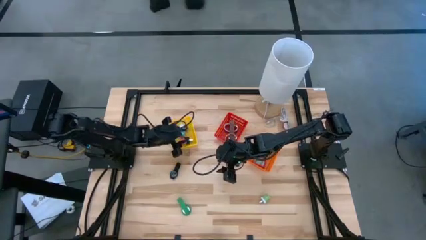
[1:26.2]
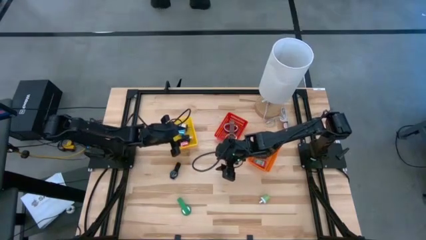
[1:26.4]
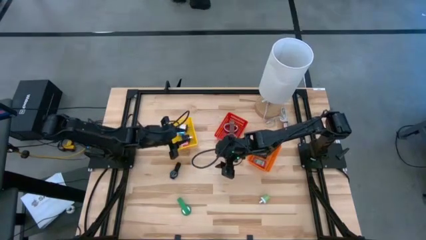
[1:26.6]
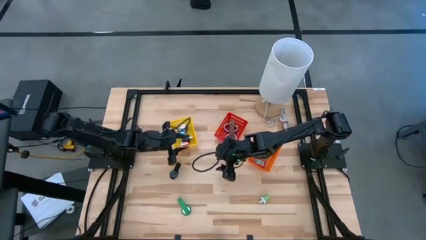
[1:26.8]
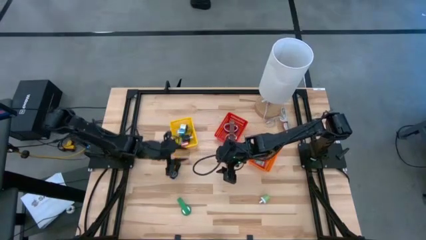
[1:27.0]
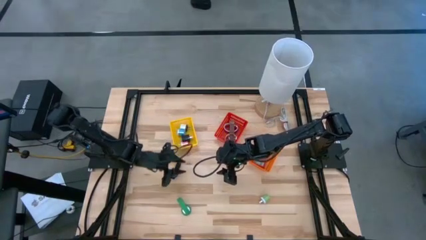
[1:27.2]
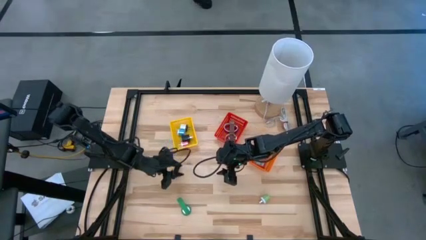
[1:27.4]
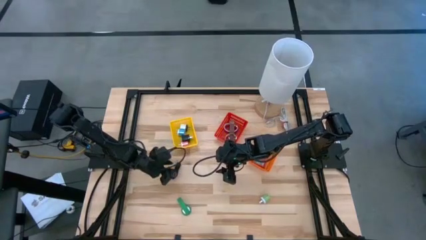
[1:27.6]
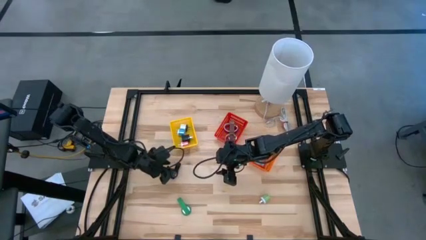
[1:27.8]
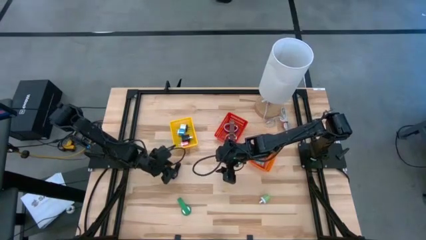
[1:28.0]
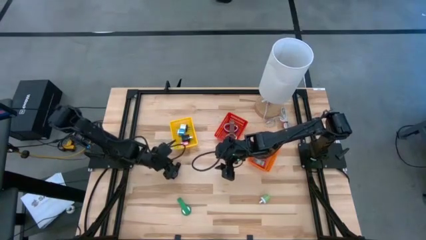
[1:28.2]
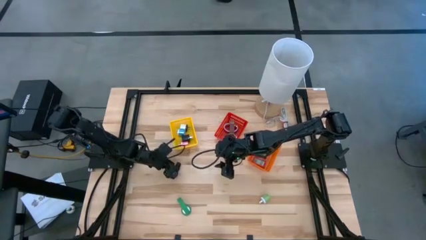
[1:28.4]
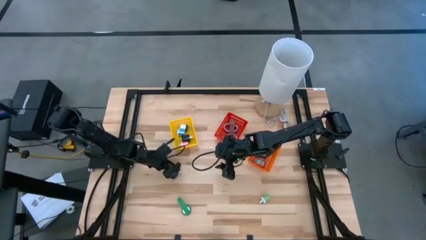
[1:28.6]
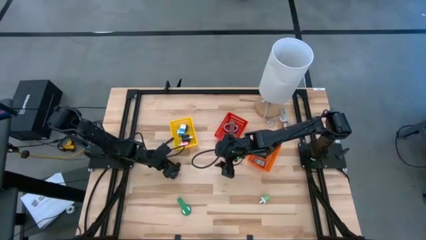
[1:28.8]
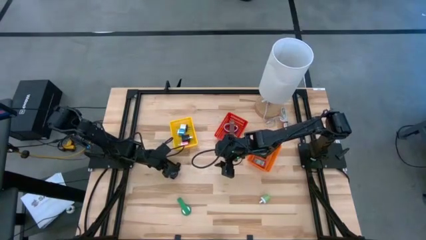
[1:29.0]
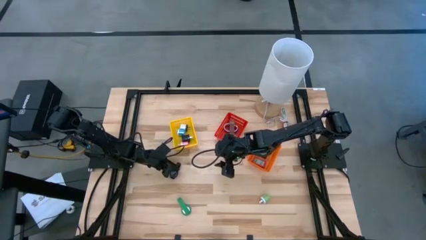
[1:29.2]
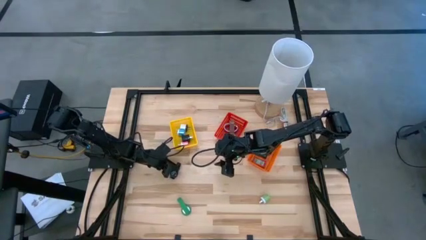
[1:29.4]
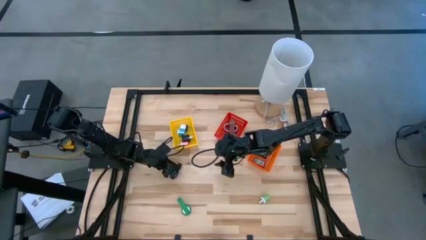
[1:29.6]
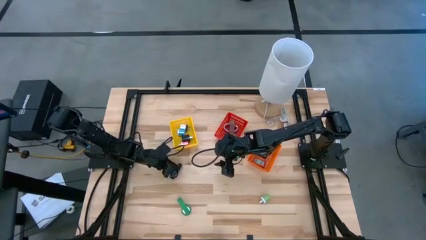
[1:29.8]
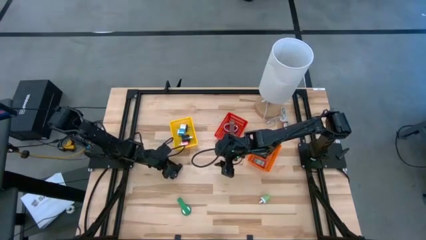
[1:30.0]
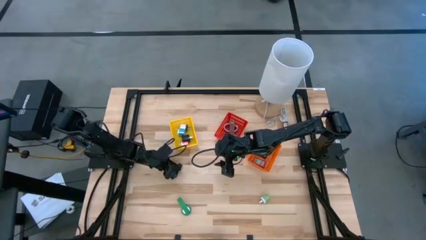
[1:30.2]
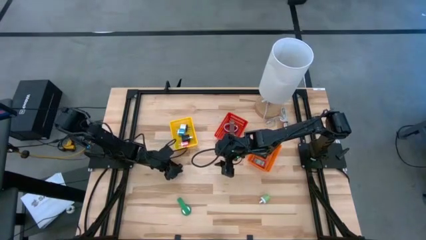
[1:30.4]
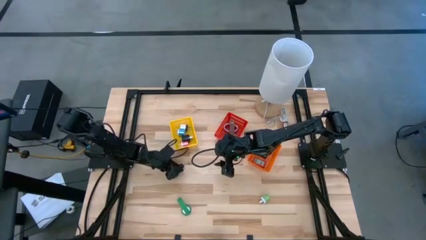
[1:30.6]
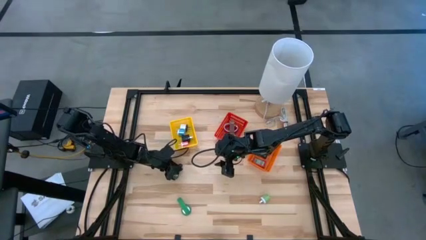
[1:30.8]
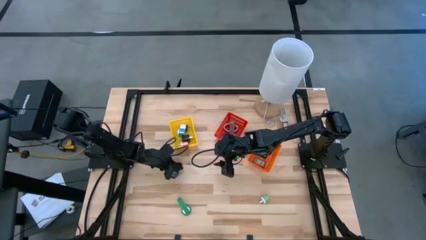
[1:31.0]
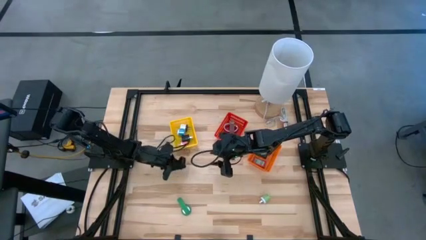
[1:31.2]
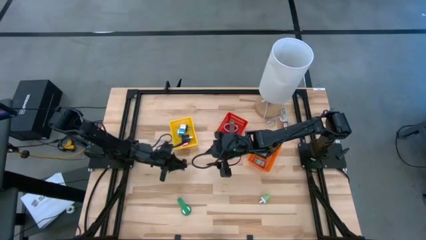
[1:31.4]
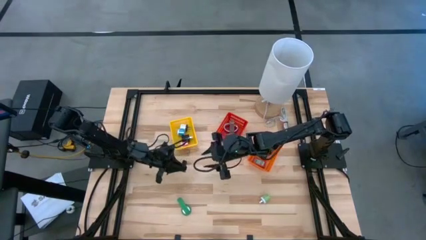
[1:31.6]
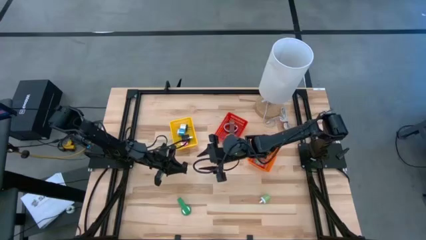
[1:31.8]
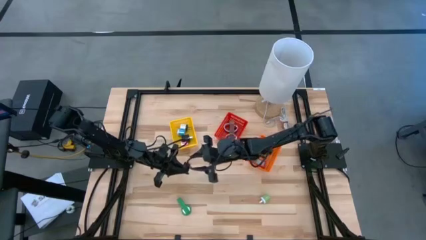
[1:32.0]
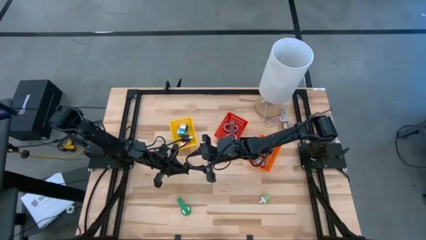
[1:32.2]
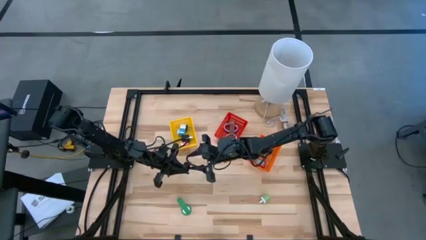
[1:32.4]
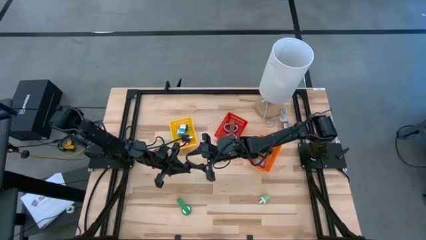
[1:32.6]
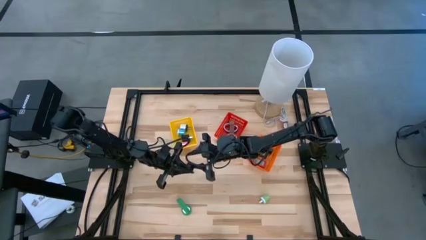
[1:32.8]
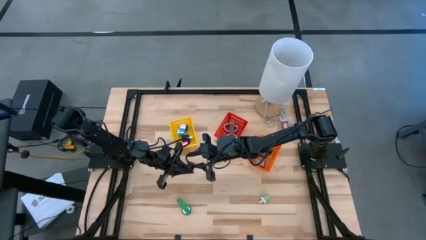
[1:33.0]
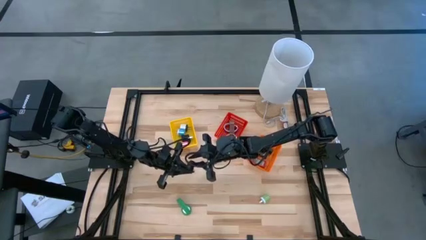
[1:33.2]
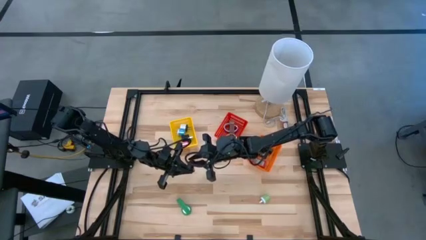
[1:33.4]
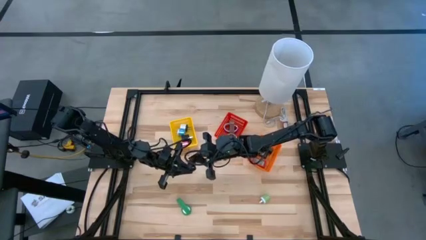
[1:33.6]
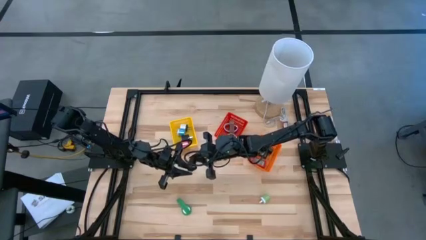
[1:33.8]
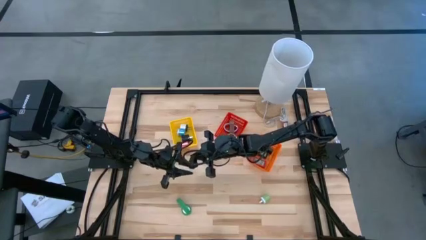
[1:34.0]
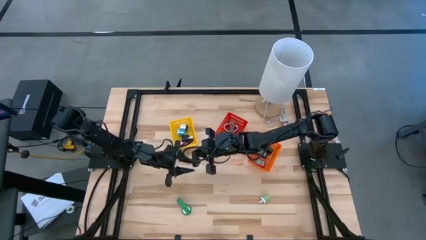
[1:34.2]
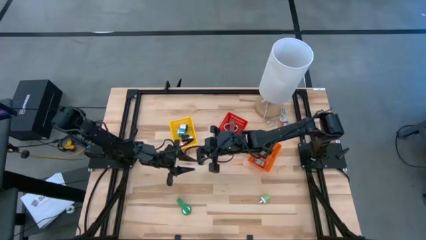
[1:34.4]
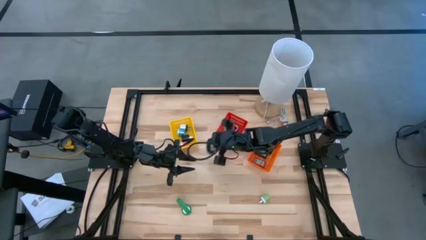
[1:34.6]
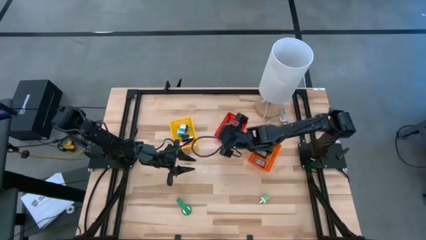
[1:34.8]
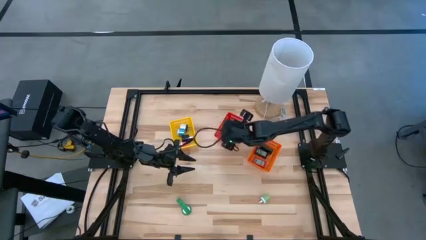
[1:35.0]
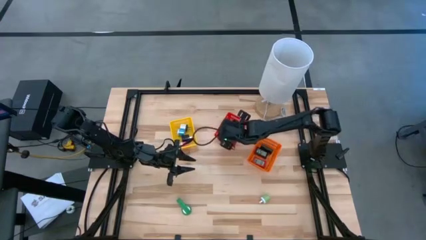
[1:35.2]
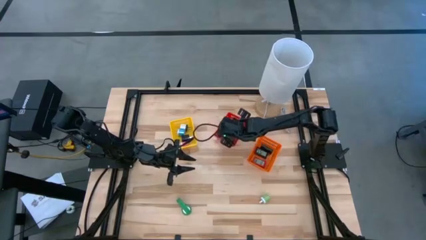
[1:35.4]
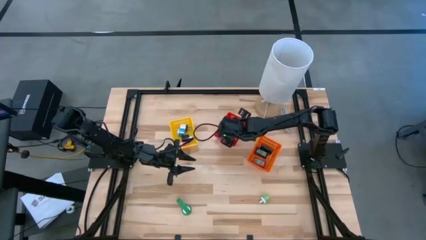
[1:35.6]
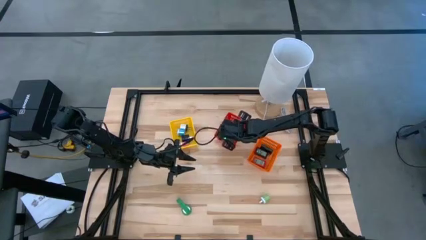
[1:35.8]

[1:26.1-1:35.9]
Task: Pick & Place Office items
Put the black watch into the red basket

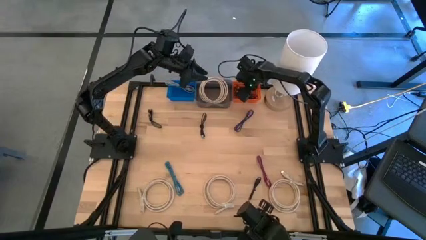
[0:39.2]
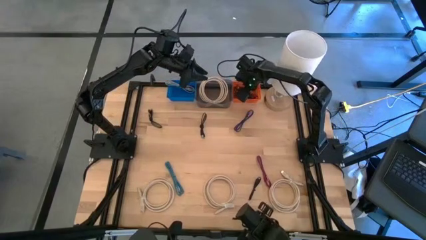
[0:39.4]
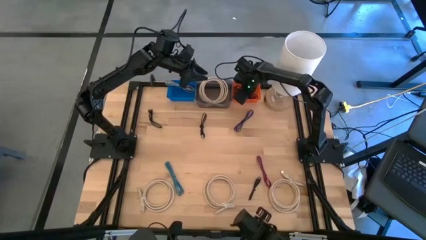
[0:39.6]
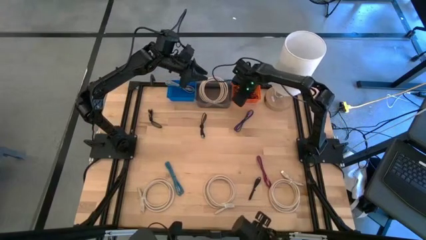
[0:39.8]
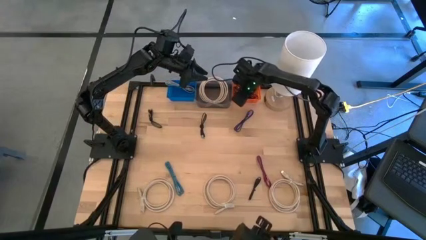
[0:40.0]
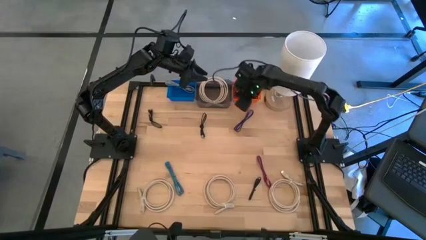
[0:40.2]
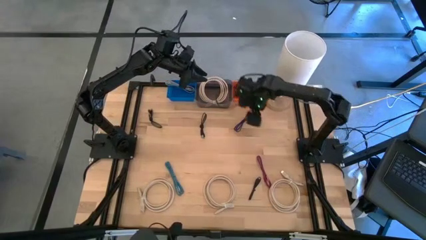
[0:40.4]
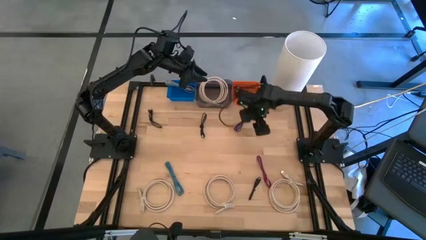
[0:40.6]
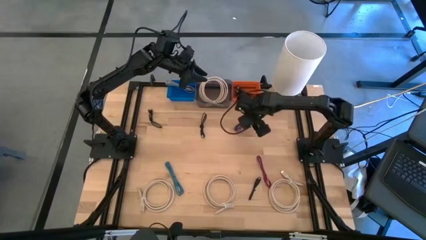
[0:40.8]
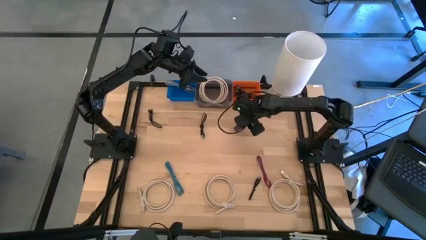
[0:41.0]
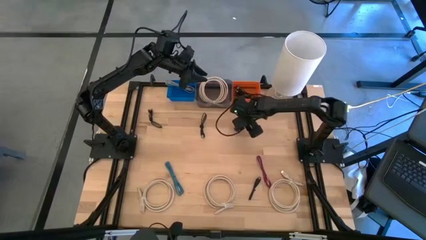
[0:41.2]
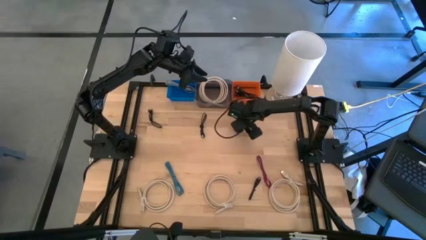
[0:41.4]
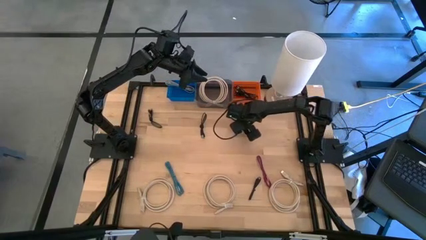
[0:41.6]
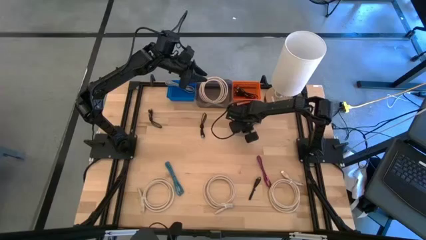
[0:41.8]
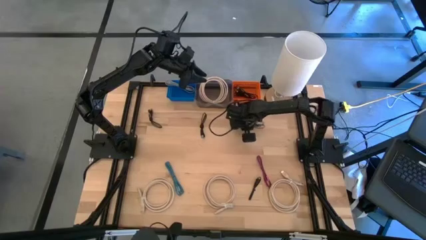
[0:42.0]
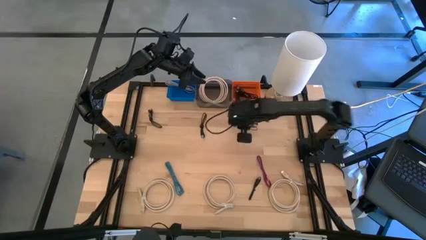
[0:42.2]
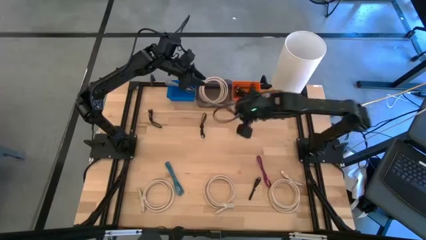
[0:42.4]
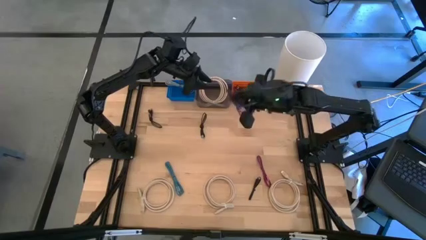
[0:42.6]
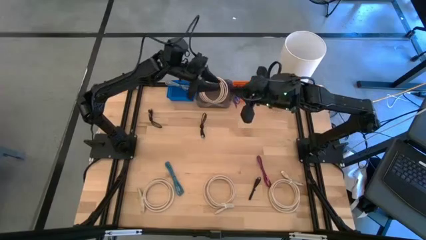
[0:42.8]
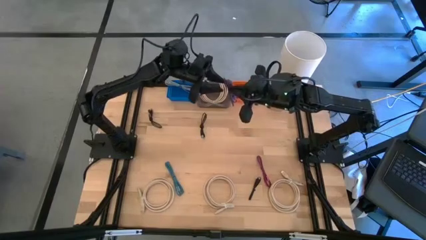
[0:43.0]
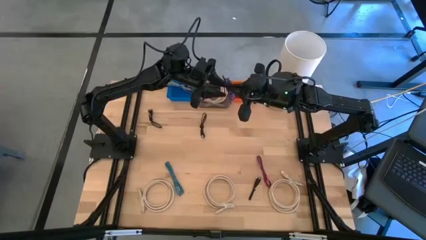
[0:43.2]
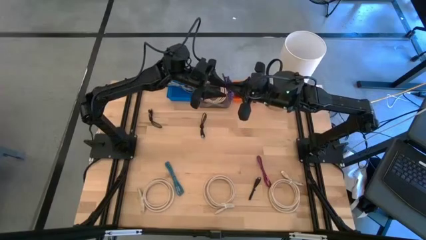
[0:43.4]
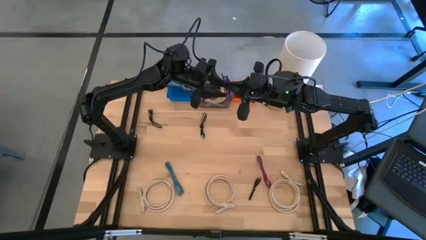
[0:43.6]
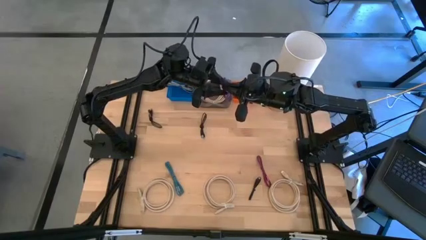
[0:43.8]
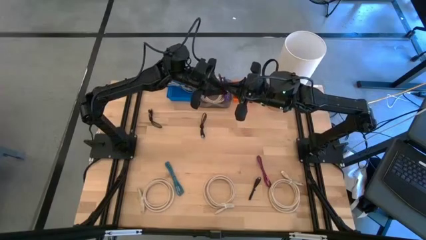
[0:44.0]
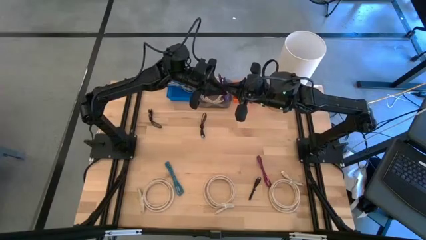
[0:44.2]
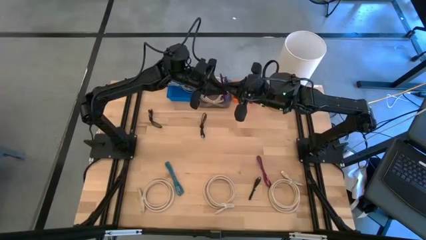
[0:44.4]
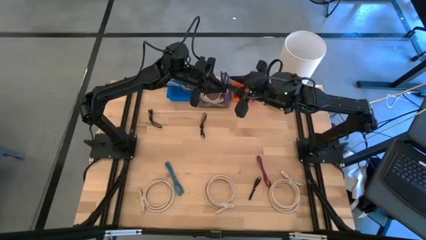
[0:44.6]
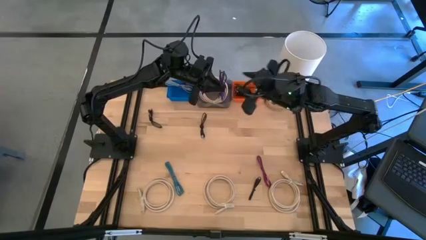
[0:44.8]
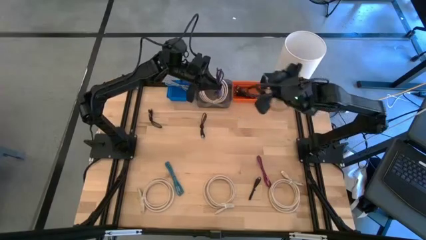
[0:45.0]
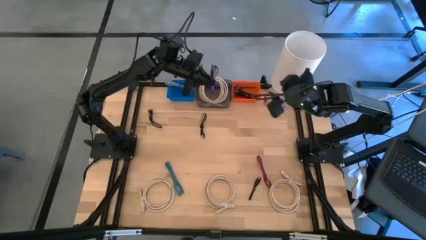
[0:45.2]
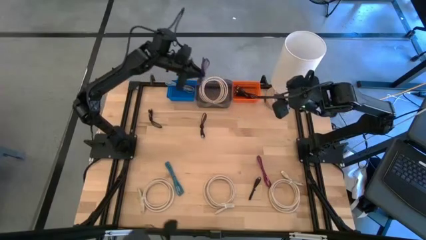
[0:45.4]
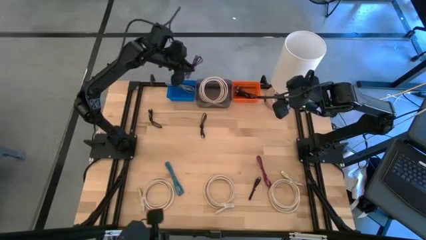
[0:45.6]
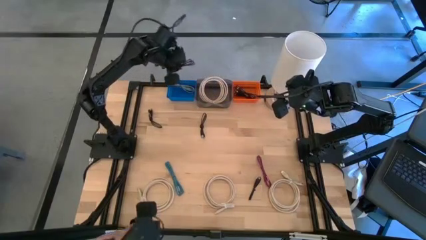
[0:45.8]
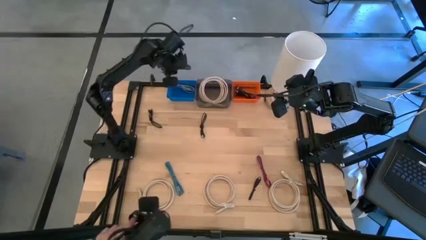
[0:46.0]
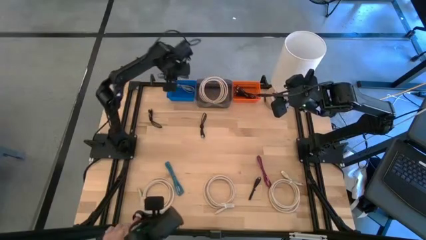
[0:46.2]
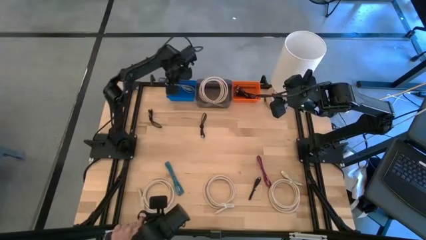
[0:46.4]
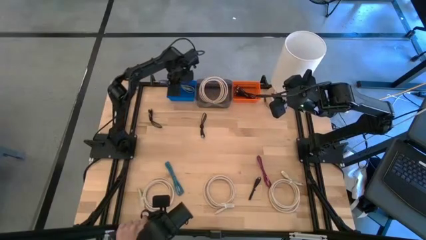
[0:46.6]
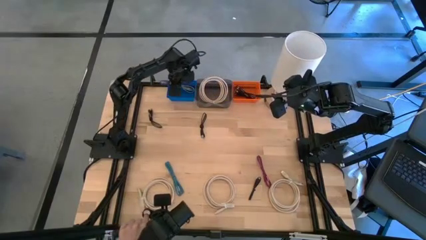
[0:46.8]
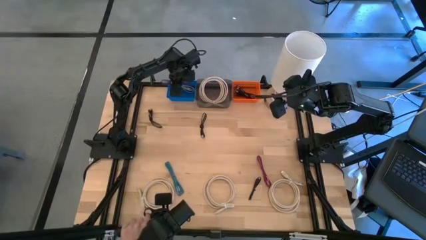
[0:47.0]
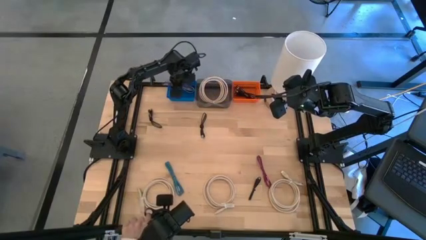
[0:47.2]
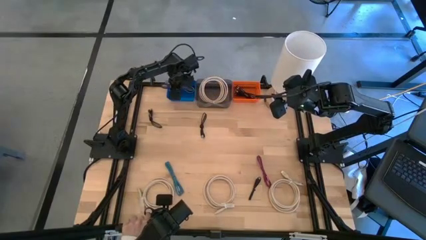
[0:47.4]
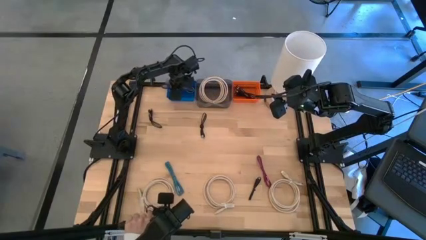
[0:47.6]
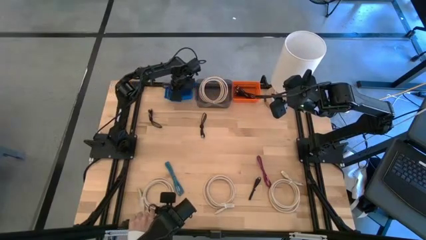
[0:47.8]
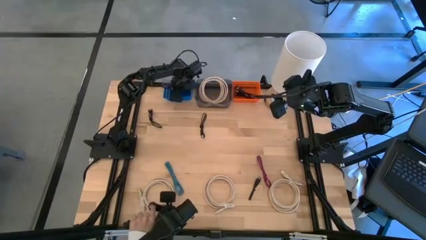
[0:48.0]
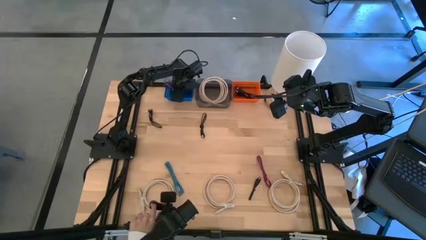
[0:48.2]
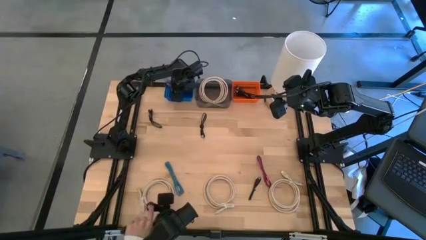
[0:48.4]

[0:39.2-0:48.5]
Task: Pick & Place USB Port
Put the purple charger cable into the blue bin
